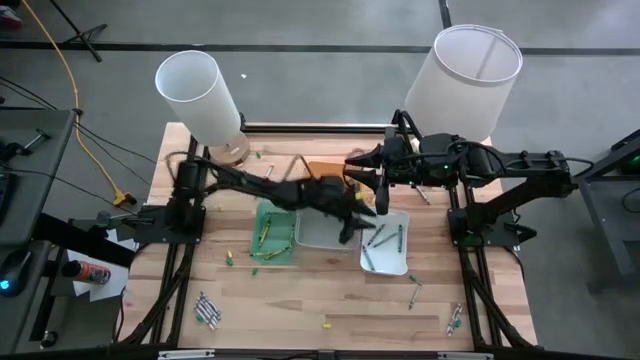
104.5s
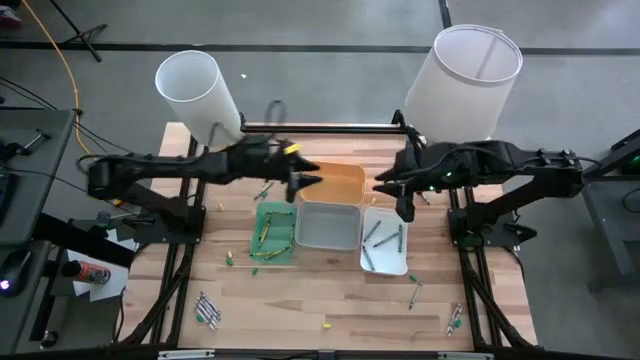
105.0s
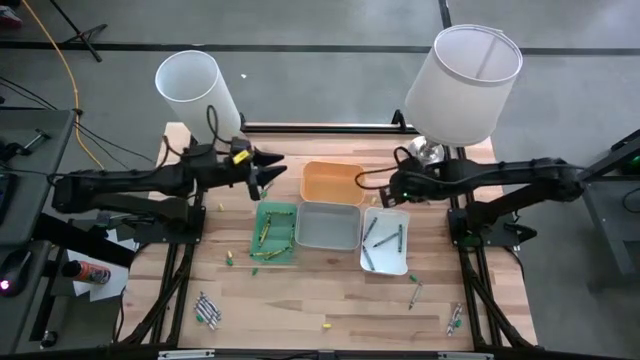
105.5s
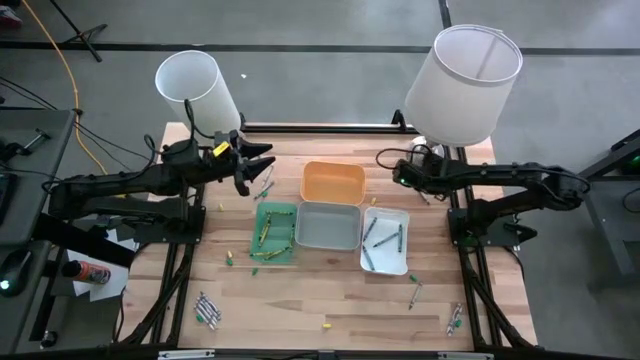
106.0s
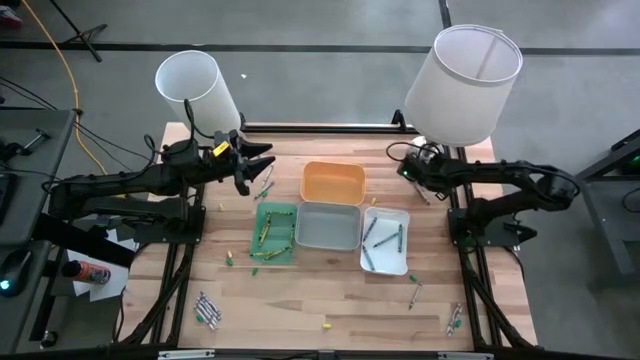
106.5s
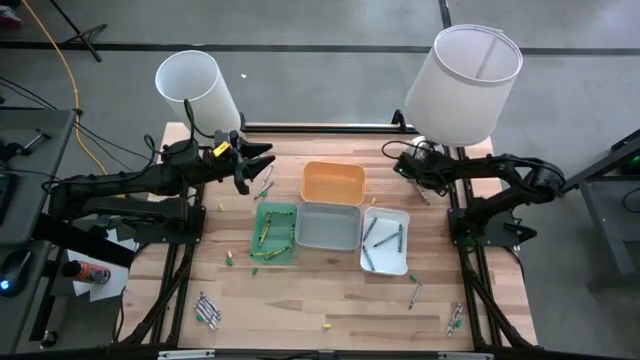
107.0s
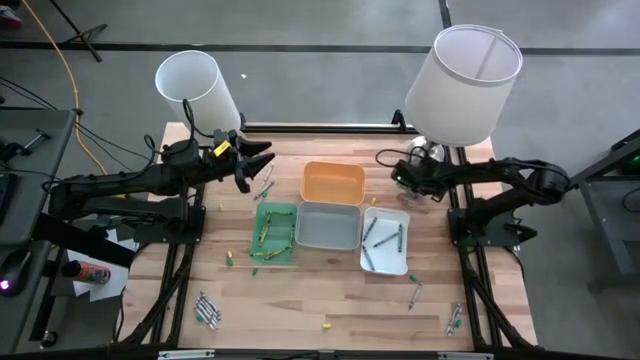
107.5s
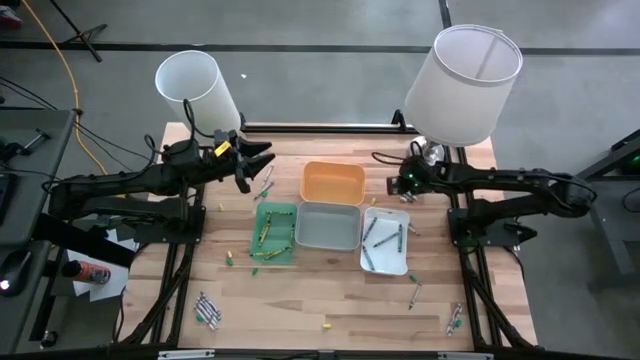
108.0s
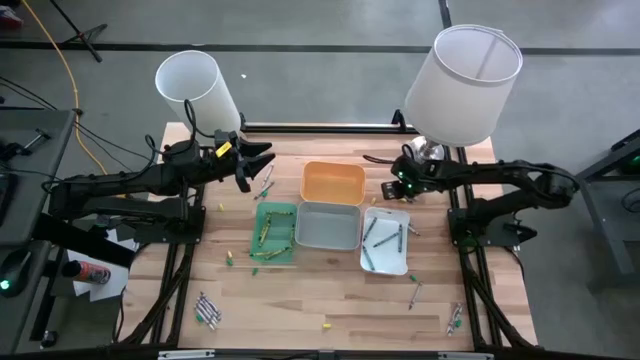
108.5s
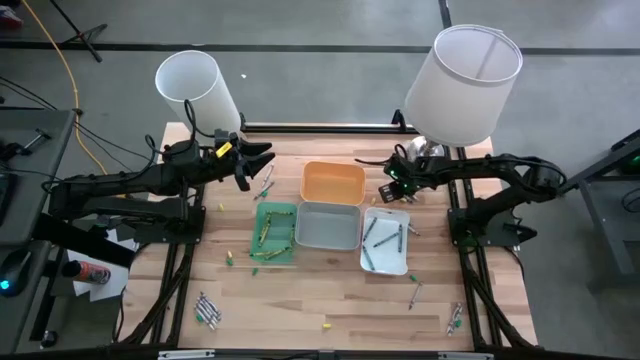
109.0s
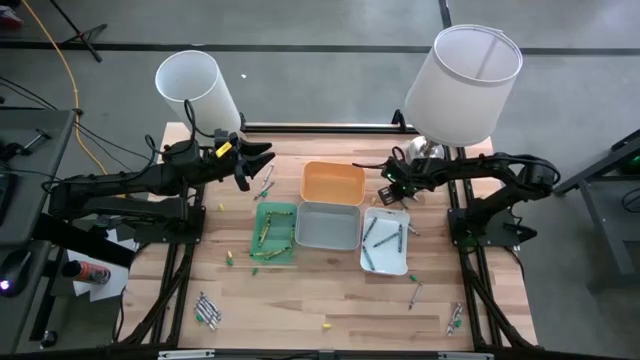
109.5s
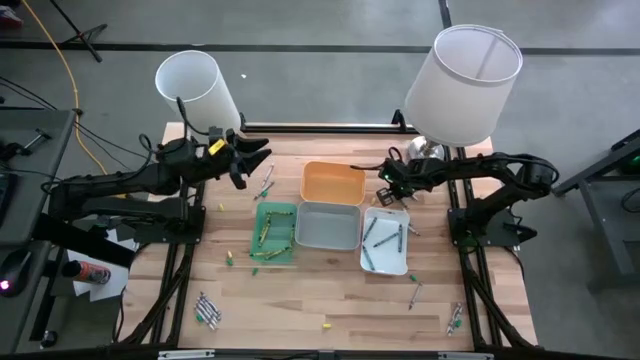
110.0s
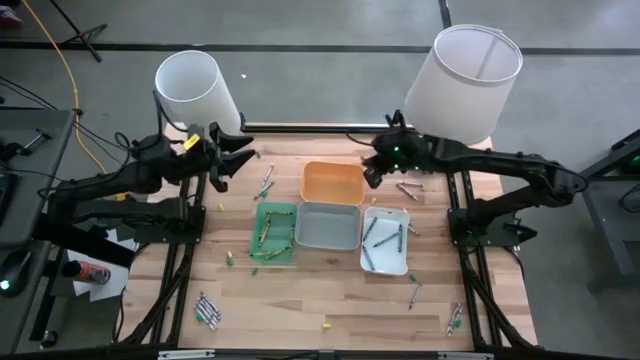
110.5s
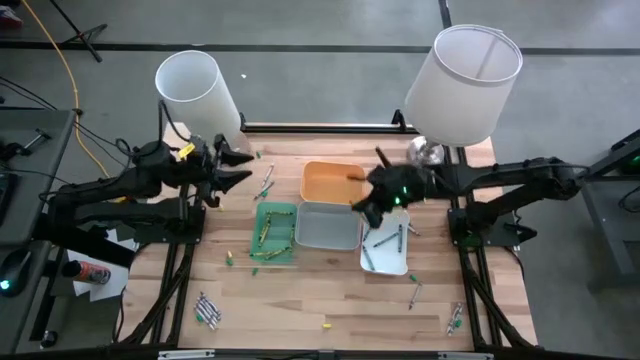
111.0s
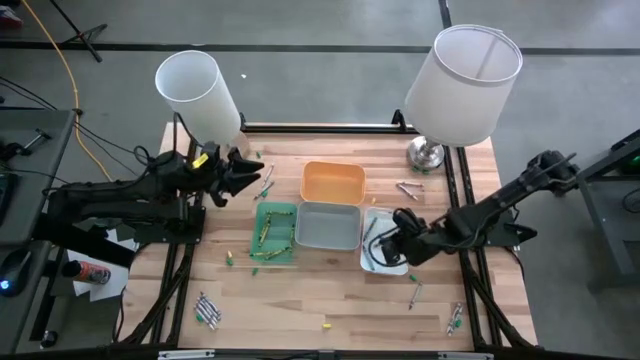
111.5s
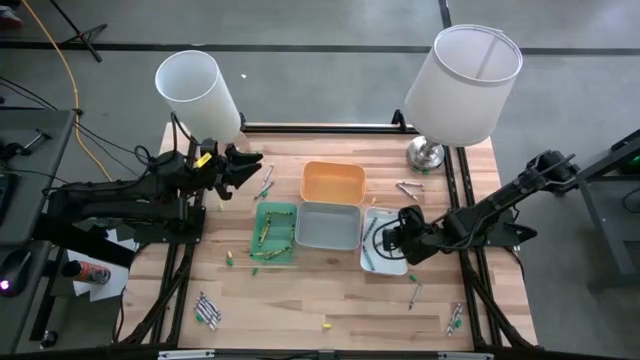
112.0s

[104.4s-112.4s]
Task: Sort crayons
Put the blue crayon into the white bin

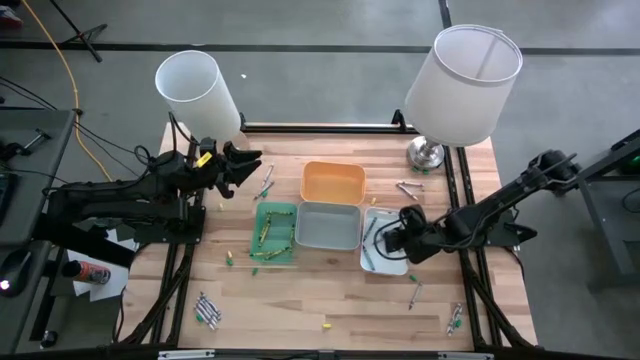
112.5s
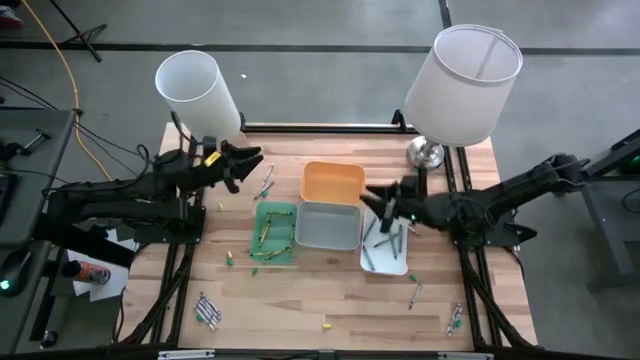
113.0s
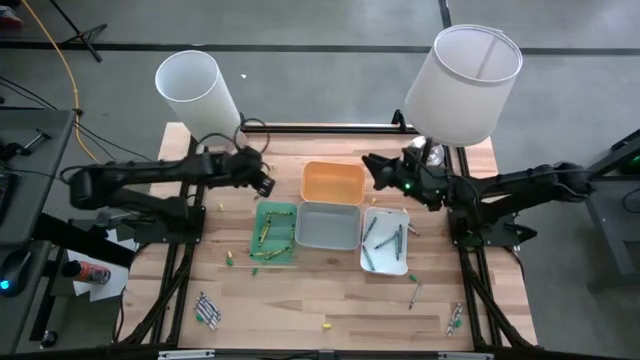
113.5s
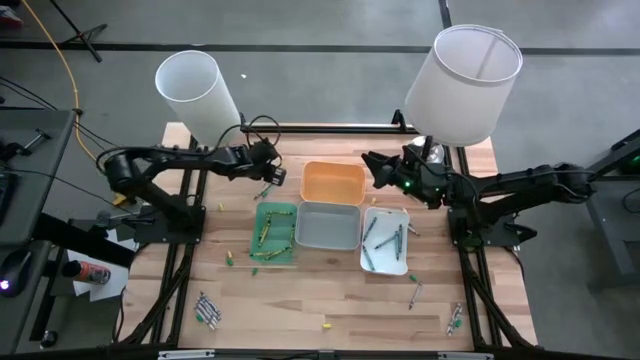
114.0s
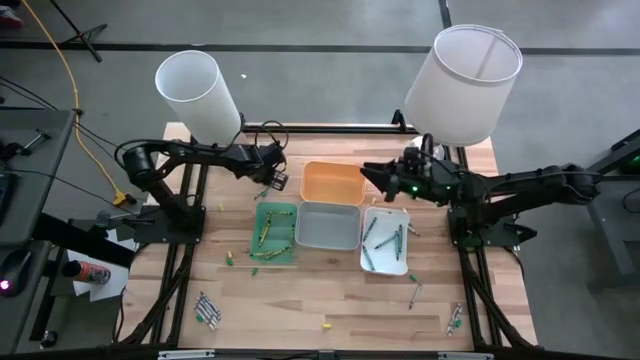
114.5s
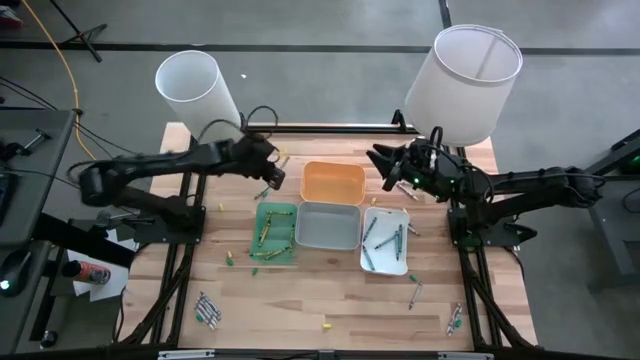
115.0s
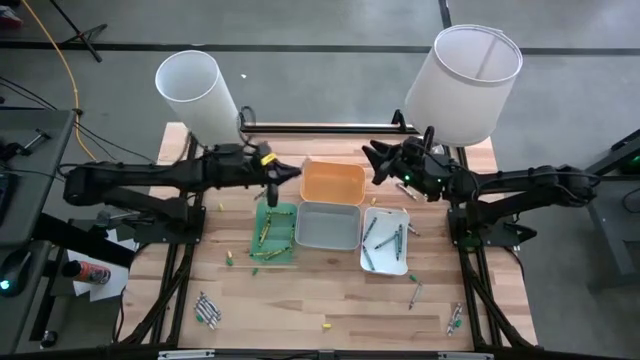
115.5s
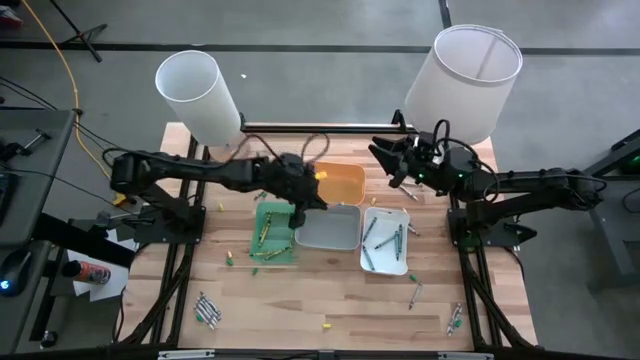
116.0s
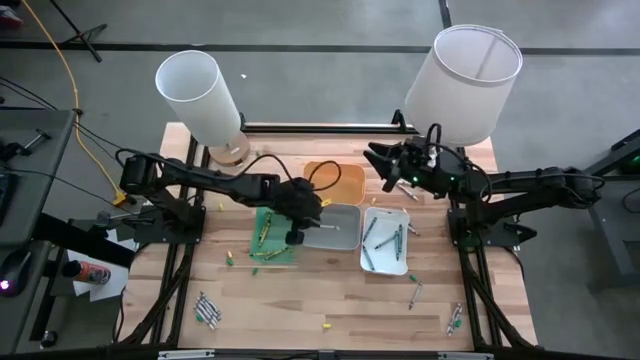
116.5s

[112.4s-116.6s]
Put the white crayon into the gray bin

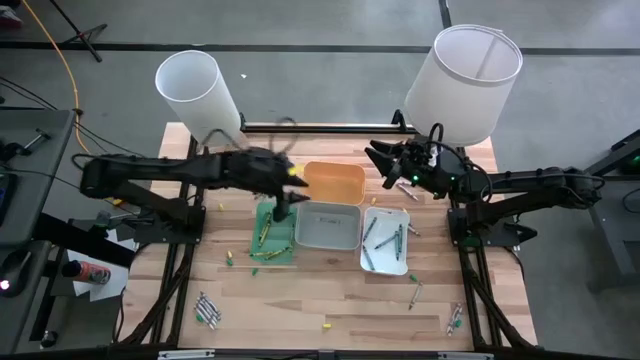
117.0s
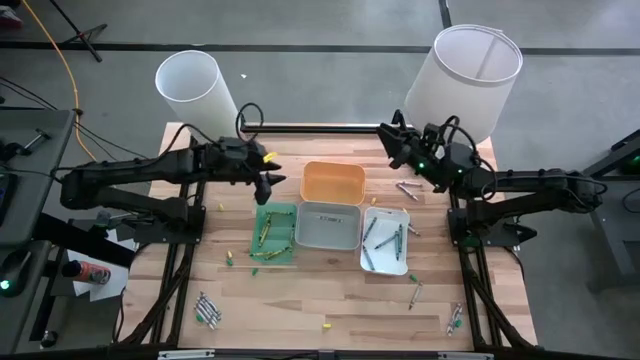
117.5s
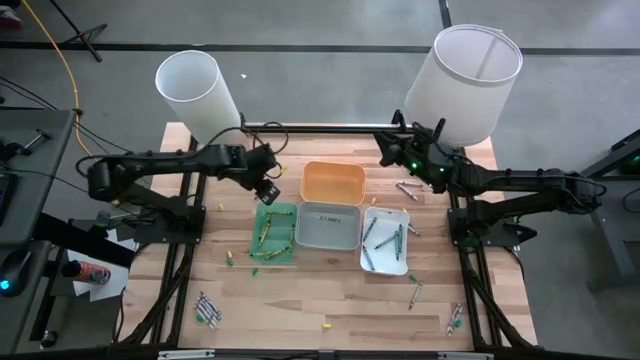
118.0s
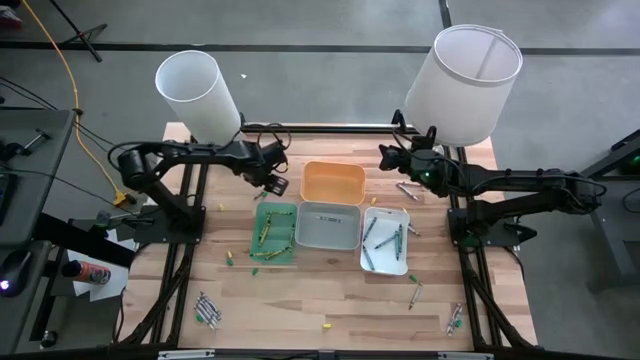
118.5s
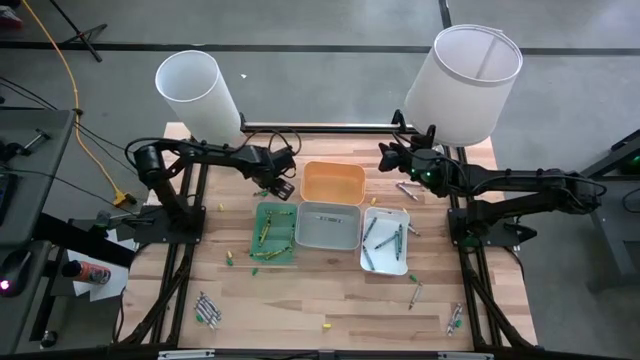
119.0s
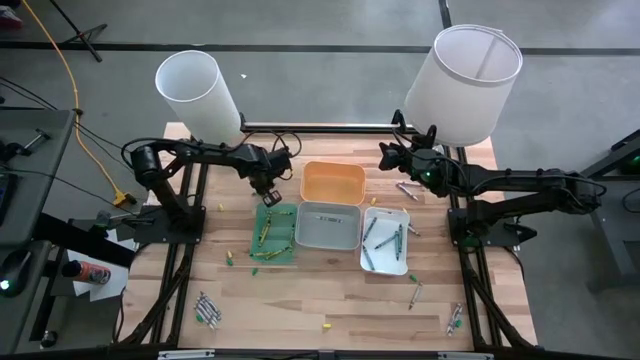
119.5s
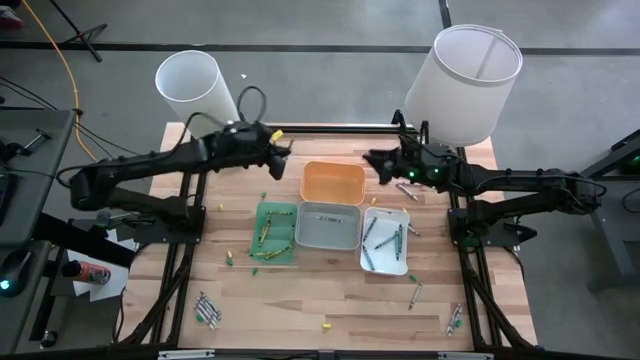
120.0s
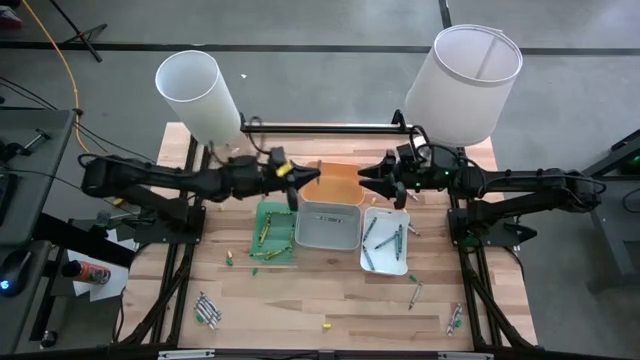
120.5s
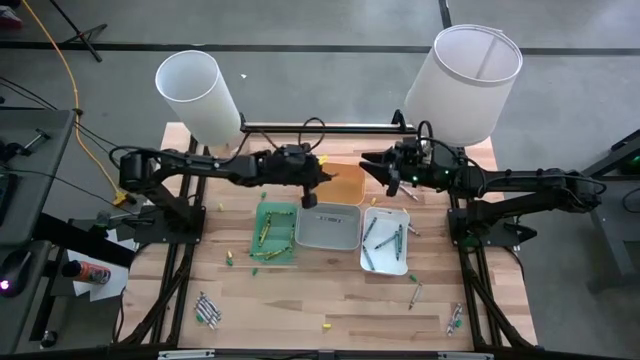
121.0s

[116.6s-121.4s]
Put the gray crayon into the yellow bin

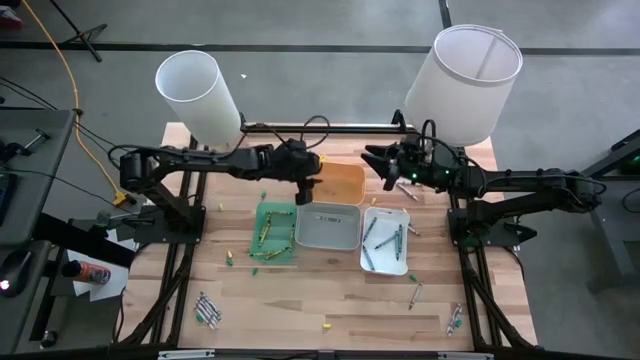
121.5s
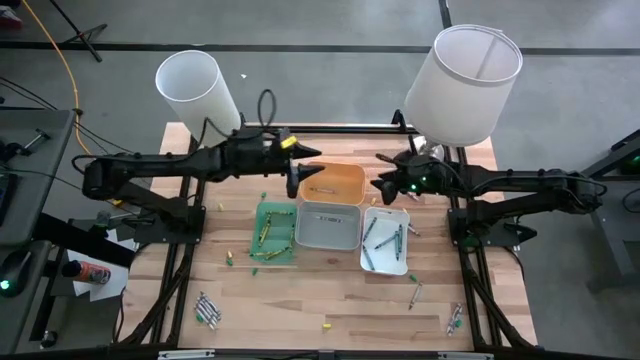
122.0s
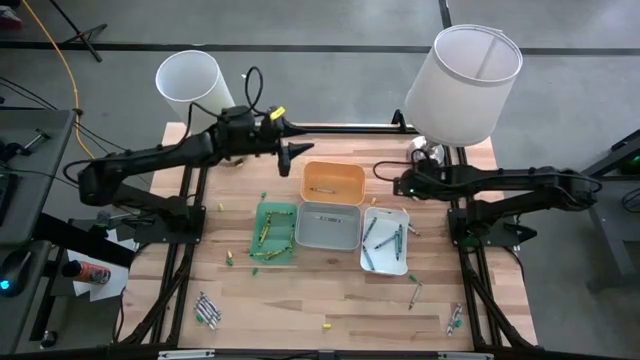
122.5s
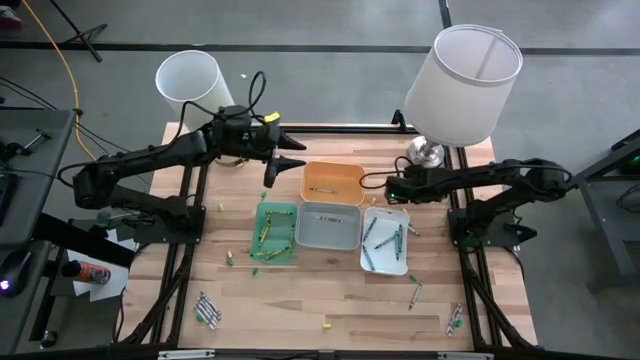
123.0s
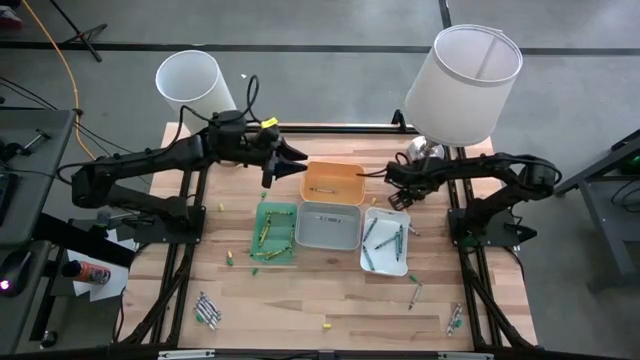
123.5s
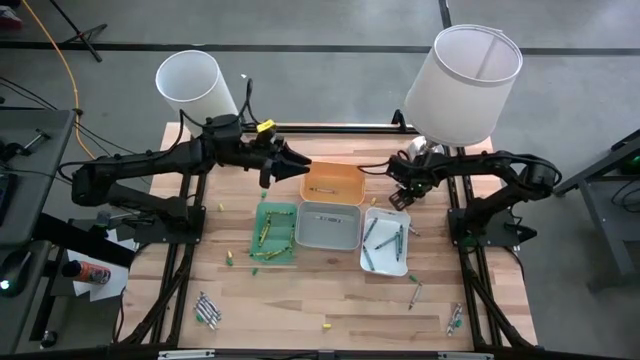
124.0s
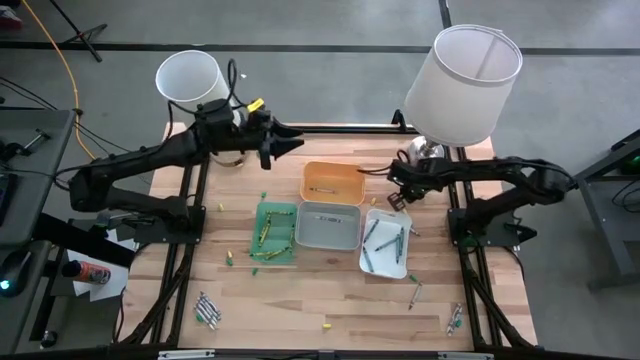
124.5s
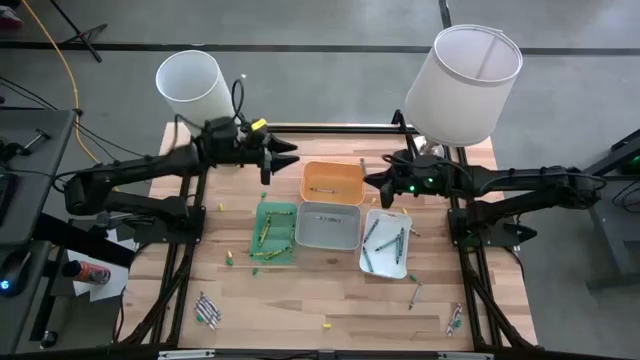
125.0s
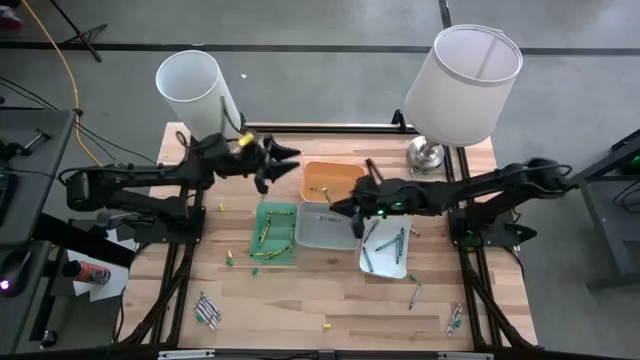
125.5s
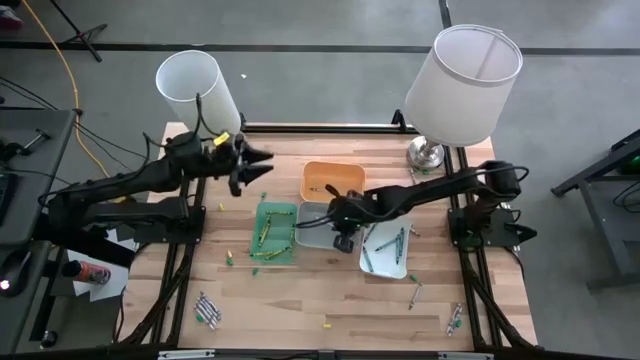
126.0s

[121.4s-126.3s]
Put the white crayon into the gray bin
